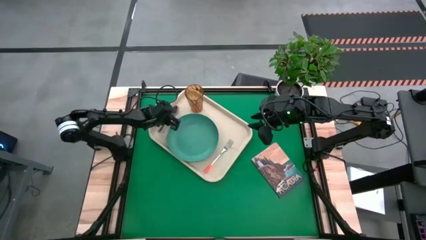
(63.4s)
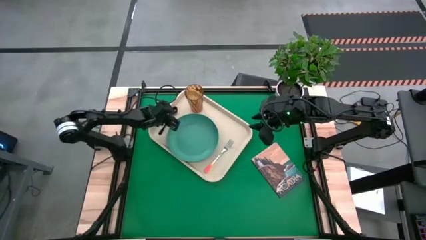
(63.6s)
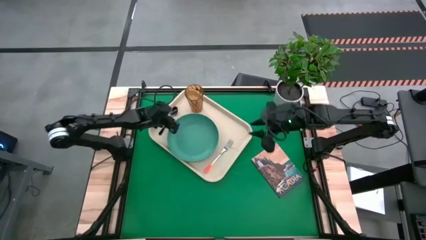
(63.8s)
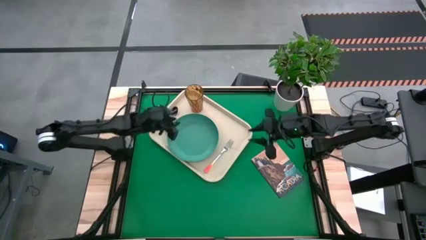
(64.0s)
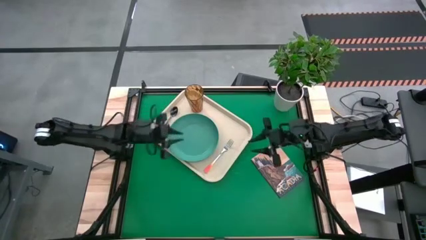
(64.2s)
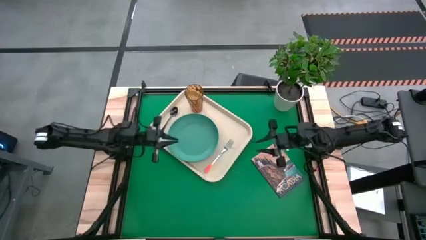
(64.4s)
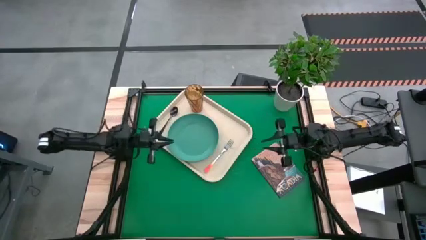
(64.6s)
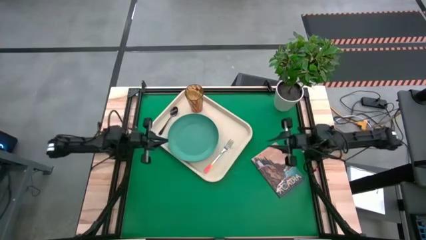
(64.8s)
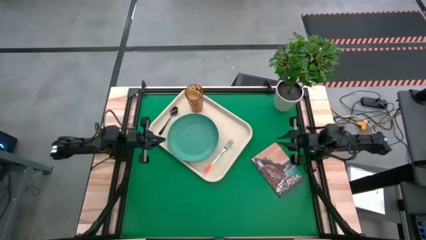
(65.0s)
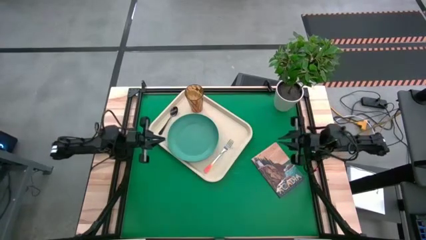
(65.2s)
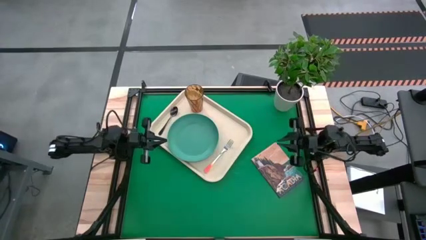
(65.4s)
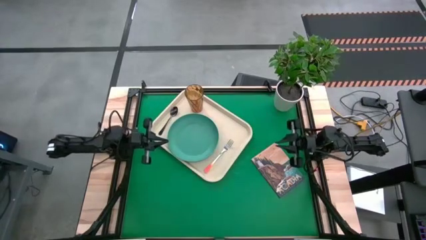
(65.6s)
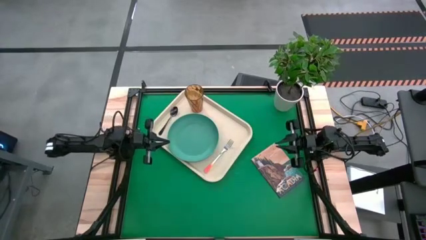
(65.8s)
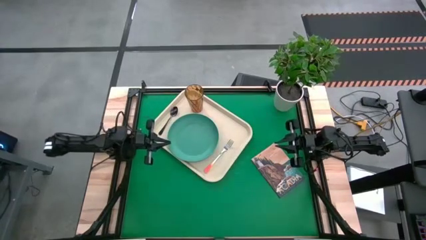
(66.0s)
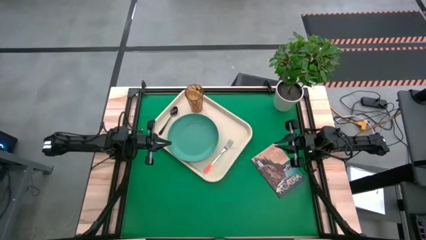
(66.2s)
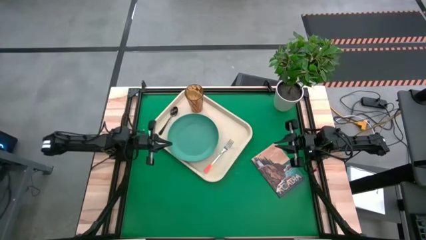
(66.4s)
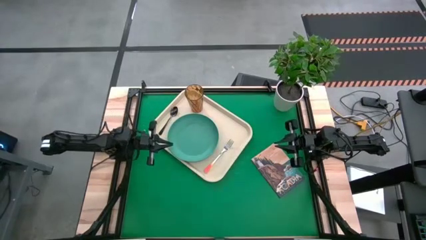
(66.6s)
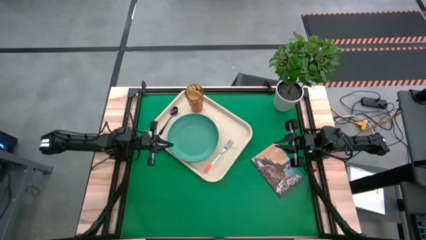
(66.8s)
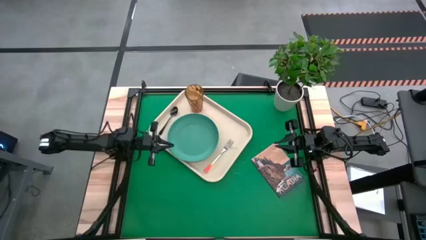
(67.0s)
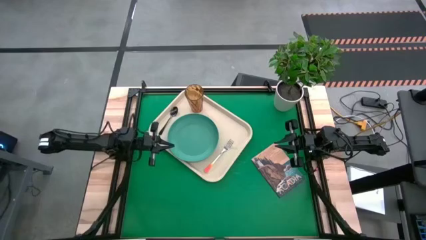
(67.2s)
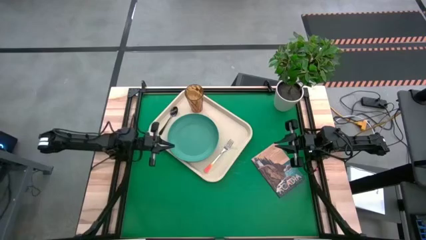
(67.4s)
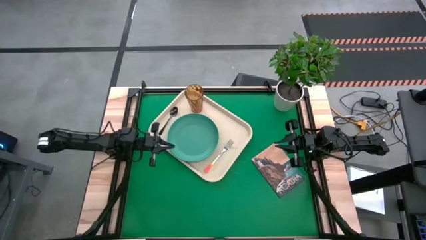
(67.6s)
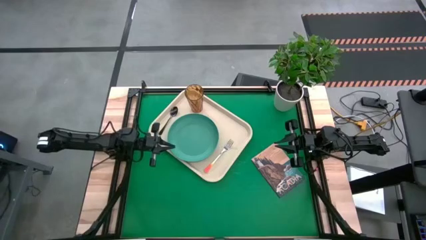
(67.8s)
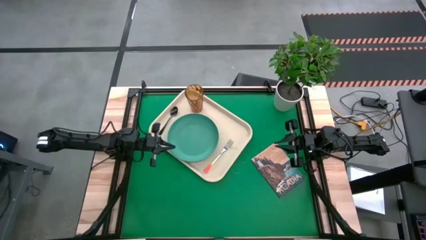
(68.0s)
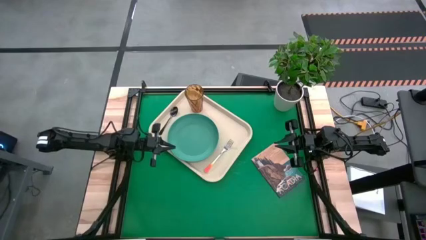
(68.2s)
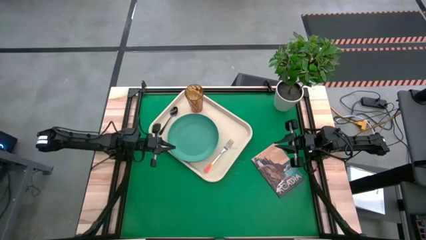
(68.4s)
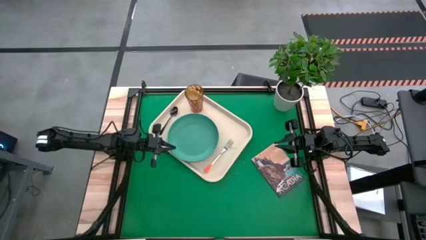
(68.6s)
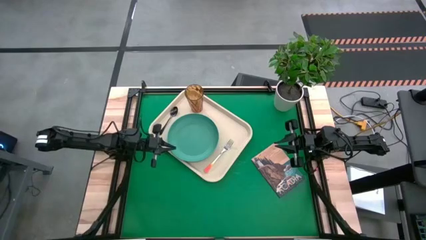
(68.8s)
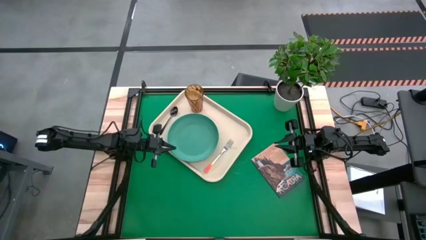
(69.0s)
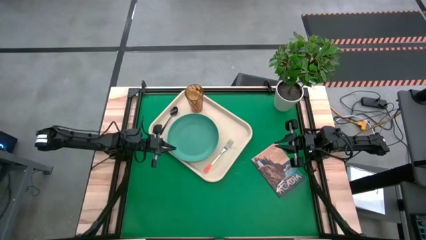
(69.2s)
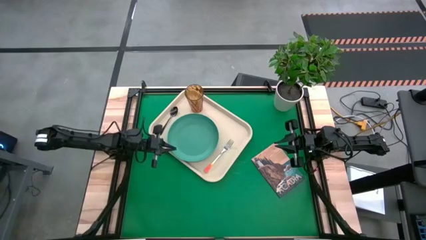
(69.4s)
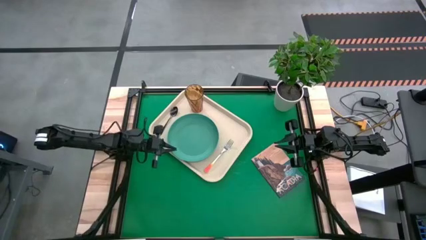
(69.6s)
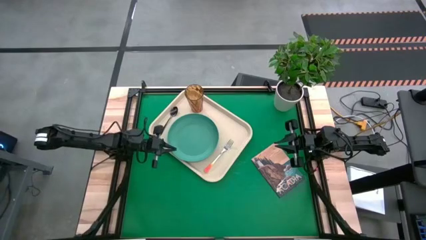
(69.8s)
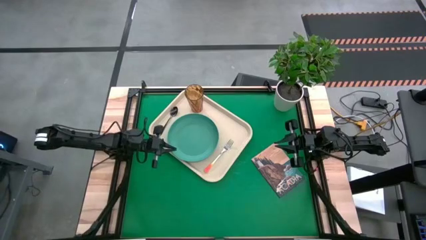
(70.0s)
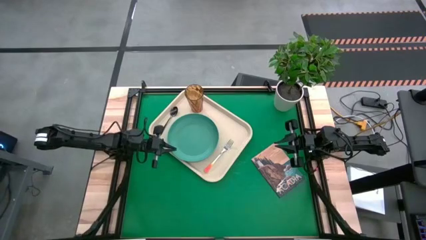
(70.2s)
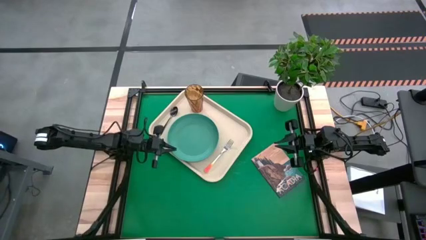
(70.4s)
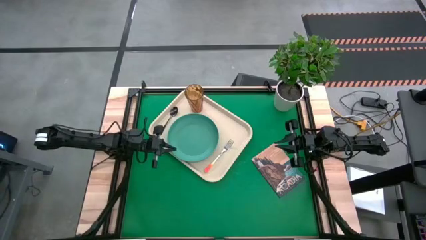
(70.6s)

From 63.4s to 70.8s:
Task: Pick and place plate/cup/fork/spoon on tray
Return to Home Position

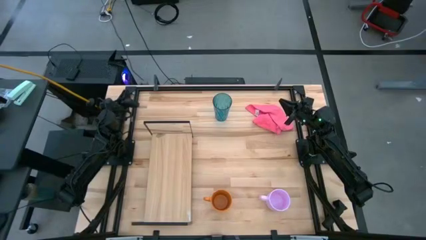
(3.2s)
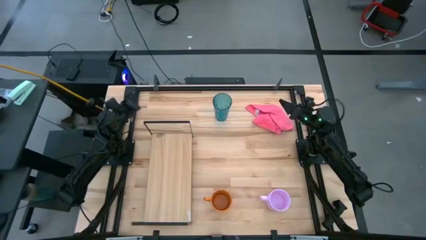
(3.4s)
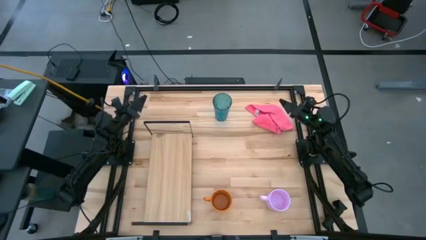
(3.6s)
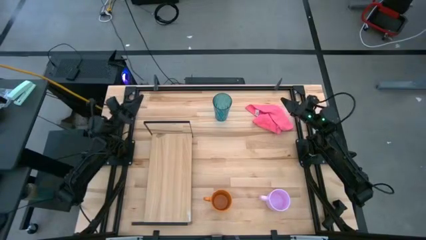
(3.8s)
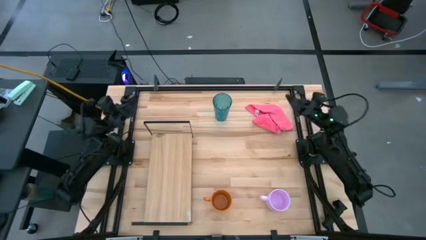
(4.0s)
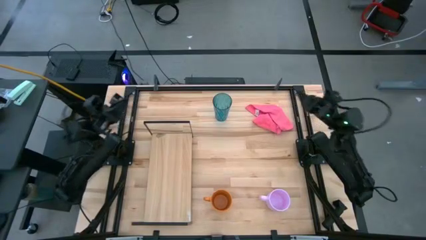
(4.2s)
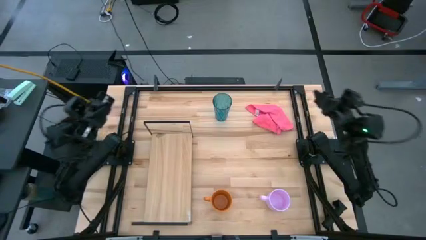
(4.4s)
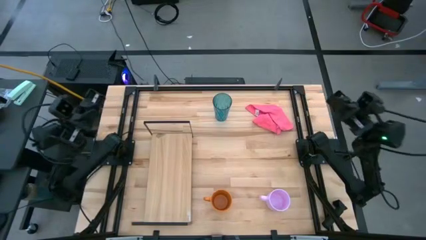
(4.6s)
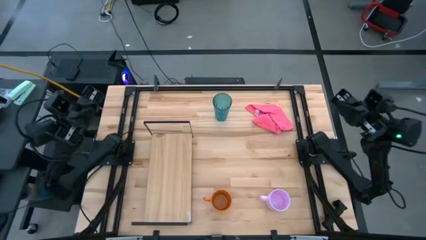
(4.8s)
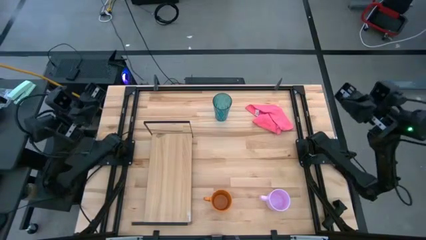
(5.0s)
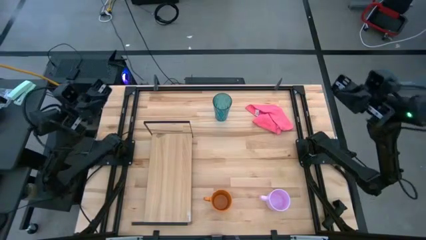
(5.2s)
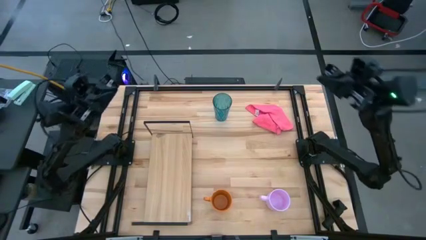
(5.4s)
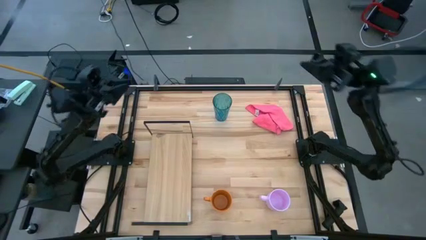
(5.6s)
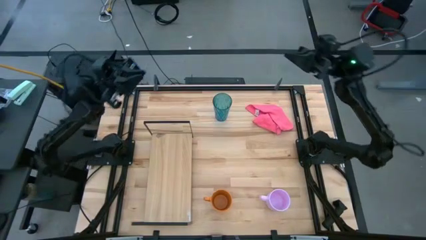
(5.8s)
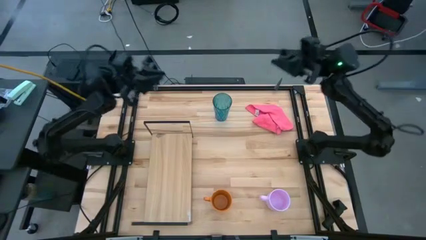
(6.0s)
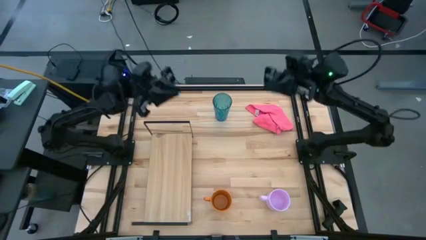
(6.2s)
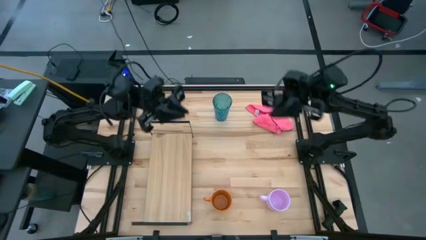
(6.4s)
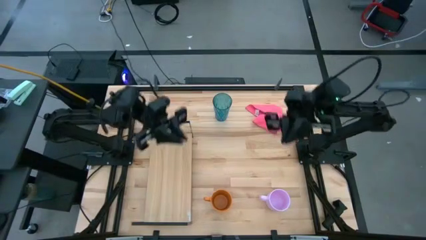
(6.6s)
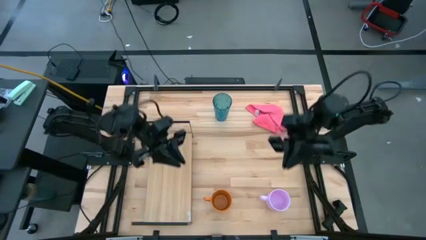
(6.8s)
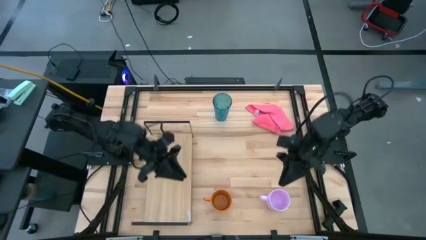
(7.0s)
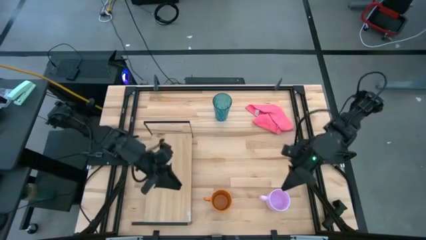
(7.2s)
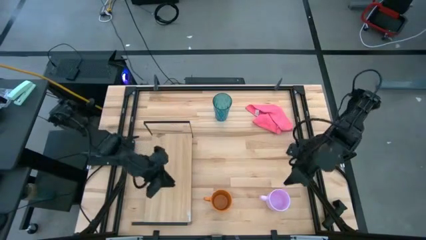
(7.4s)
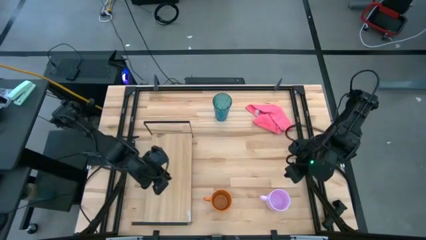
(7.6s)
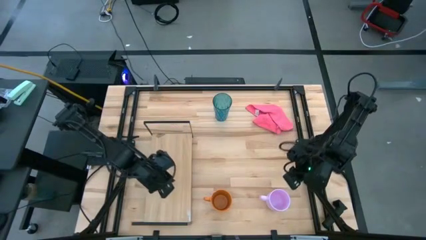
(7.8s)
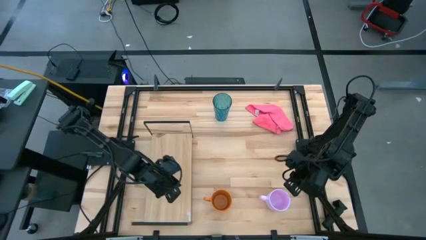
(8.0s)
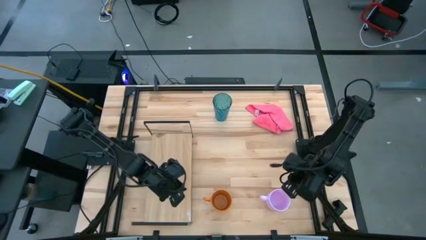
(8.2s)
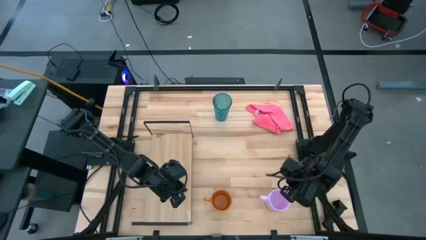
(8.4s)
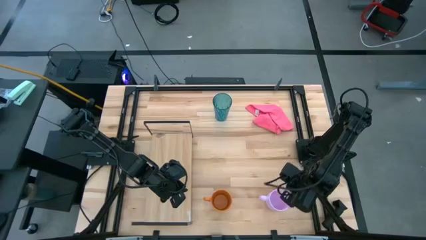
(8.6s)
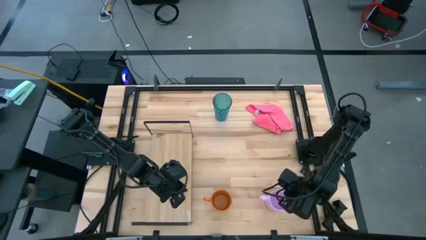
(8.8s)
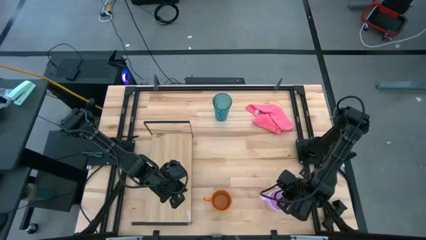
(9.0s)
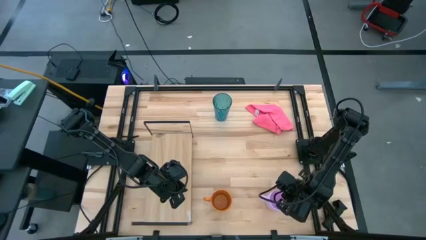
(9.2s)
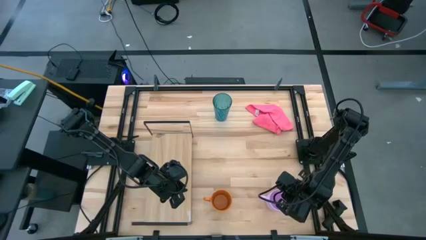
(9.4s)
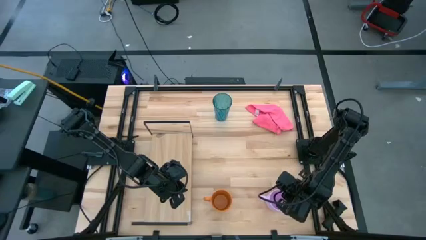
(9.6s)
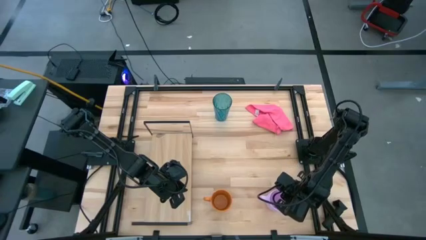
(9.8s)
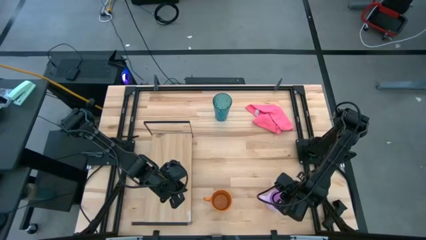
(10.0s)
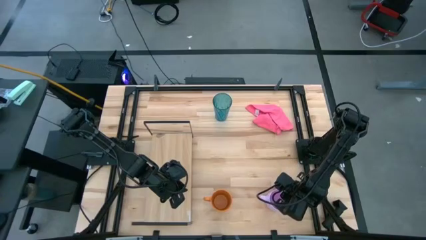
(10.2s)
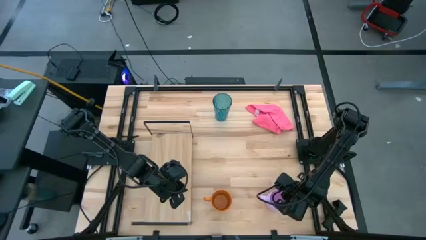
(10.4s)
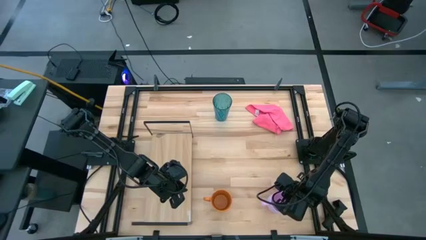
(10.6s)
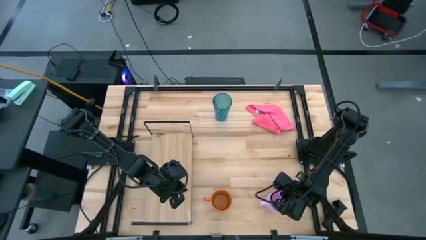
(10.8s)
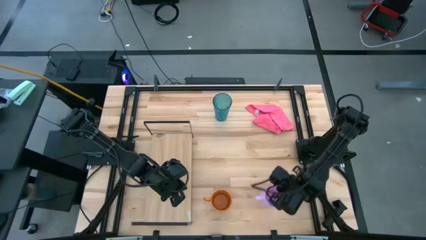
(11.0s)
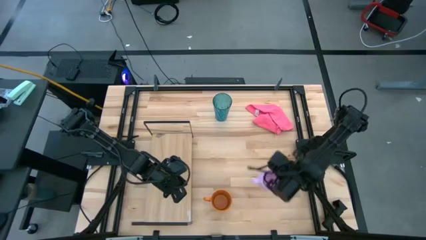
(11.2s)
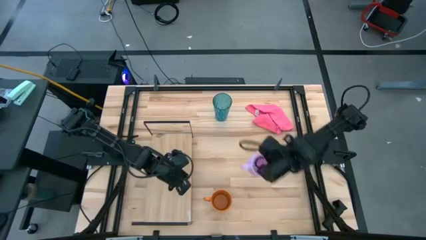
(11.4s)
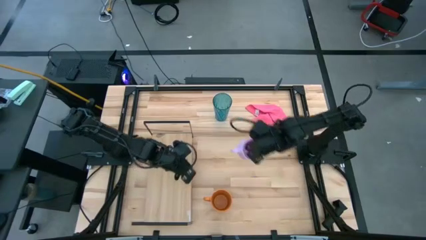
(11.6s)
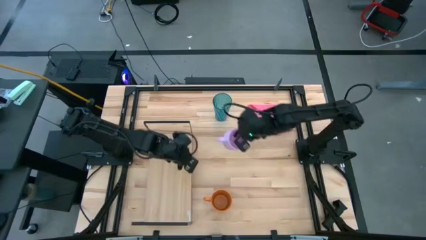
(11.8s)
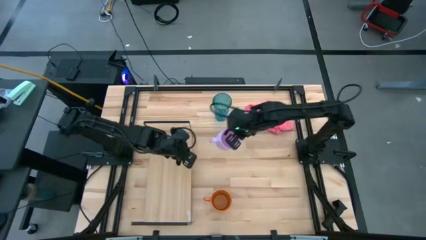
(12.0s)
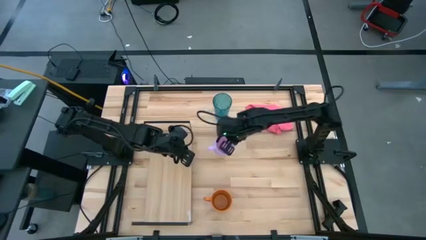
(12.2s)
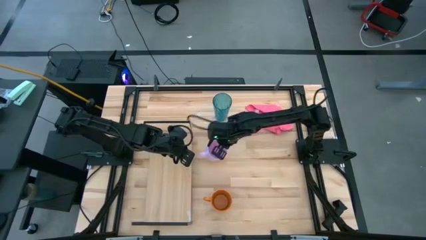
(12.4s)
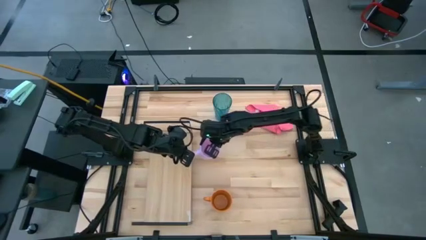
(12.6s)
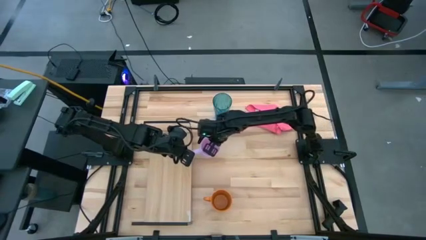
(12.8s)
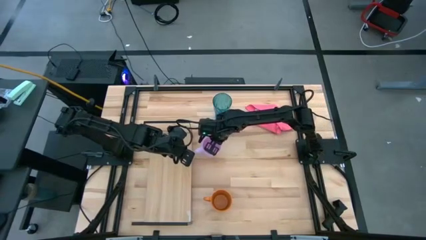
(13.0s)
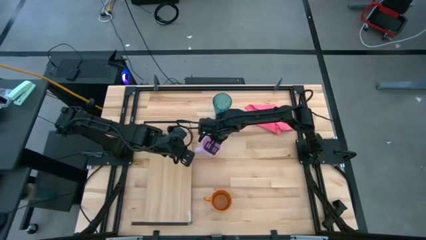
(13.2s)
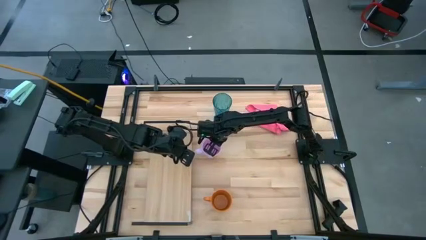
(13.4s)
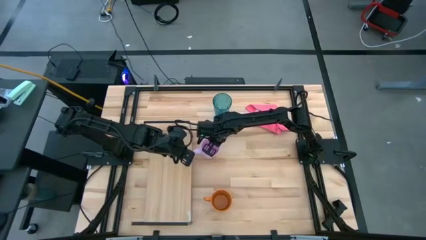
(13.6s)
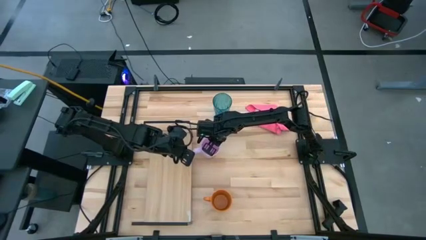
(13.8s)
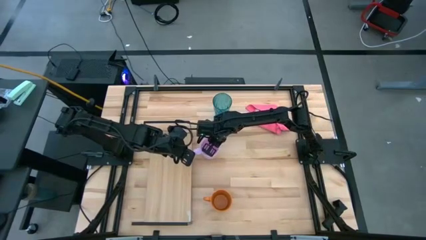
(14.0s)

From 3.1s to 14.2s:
Task: Stack small to large cups/mugs on shelf
Put the purple cup on the shelf
